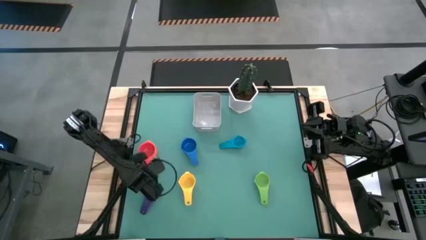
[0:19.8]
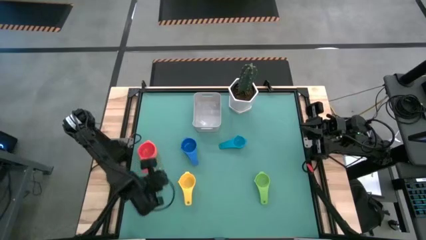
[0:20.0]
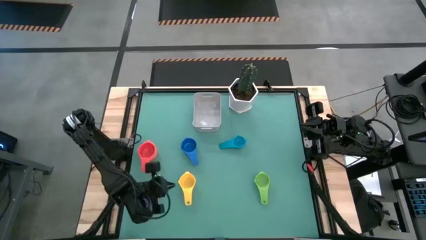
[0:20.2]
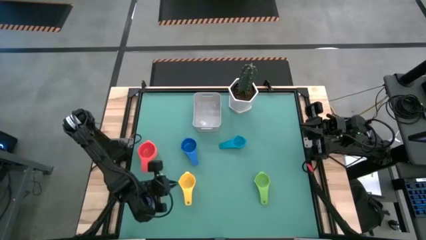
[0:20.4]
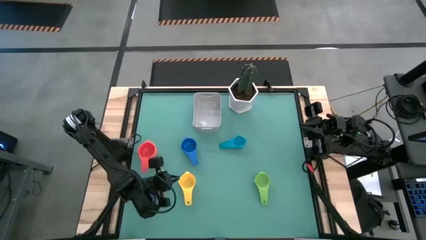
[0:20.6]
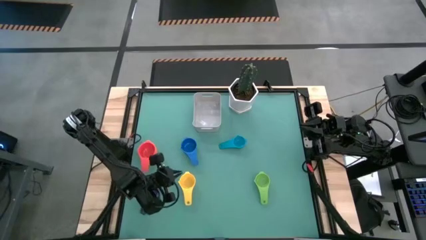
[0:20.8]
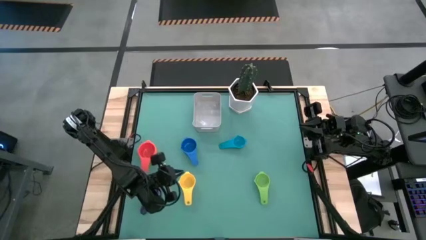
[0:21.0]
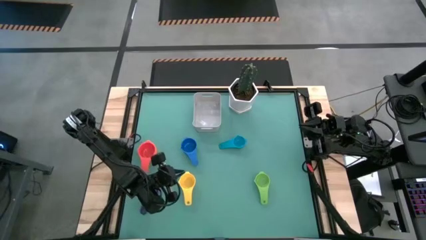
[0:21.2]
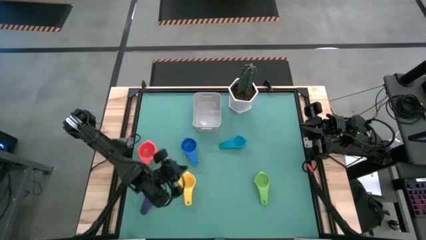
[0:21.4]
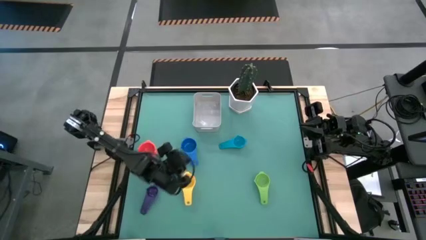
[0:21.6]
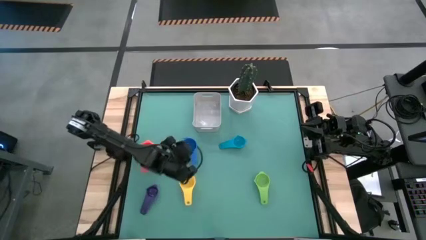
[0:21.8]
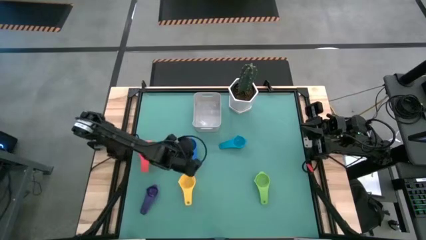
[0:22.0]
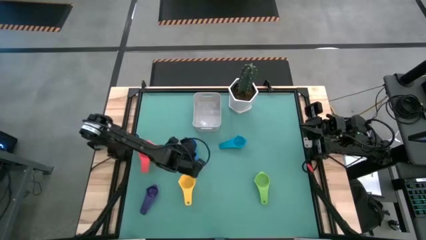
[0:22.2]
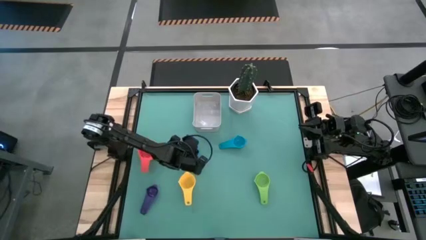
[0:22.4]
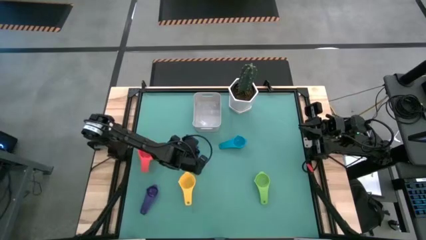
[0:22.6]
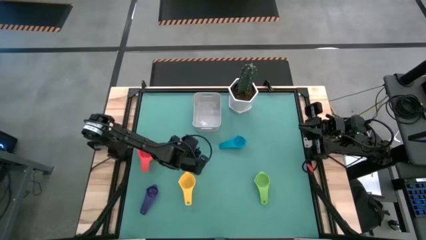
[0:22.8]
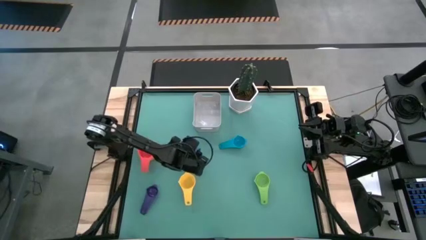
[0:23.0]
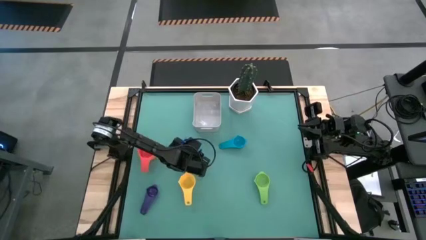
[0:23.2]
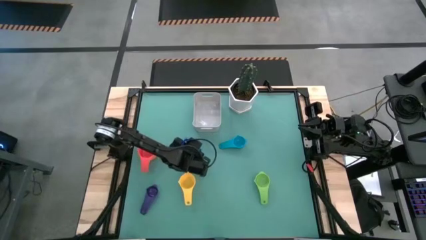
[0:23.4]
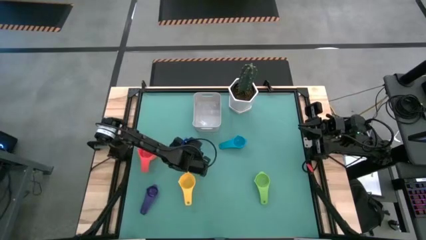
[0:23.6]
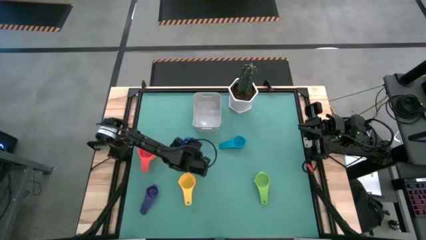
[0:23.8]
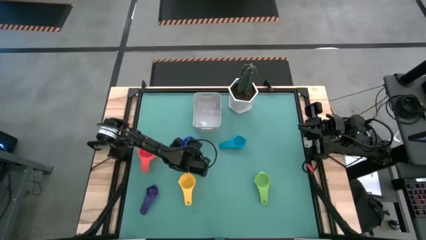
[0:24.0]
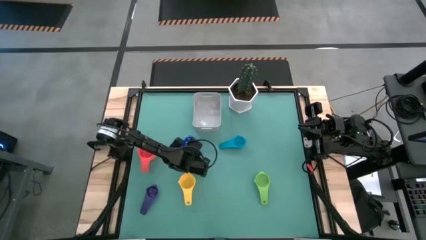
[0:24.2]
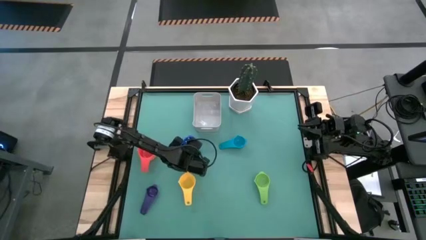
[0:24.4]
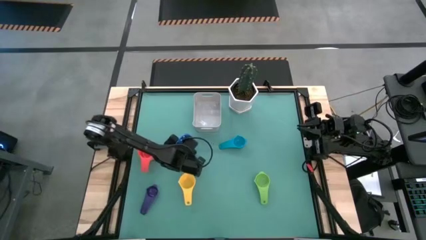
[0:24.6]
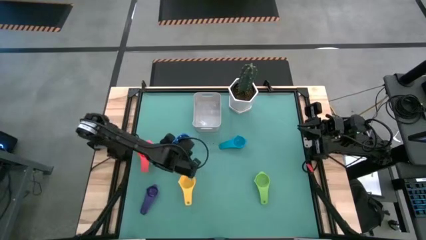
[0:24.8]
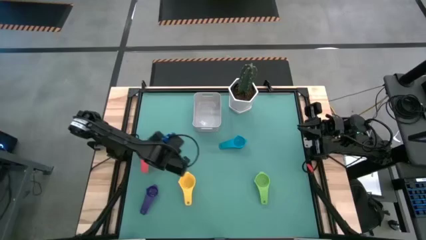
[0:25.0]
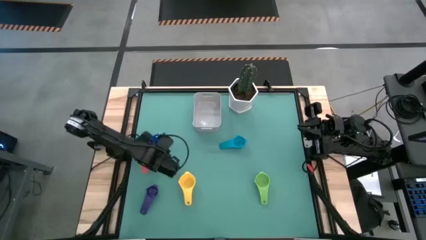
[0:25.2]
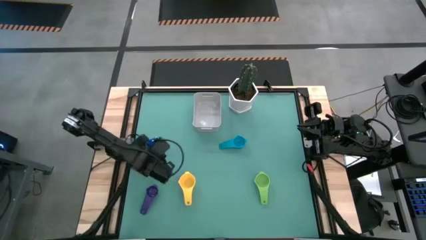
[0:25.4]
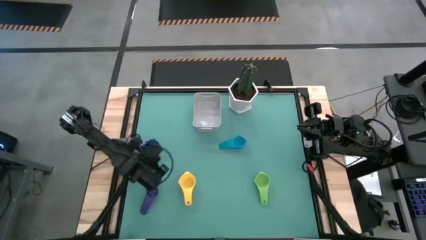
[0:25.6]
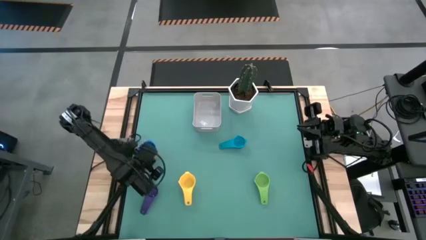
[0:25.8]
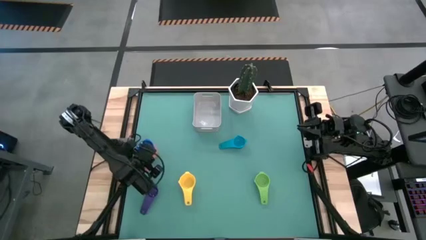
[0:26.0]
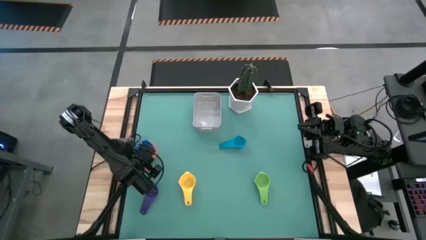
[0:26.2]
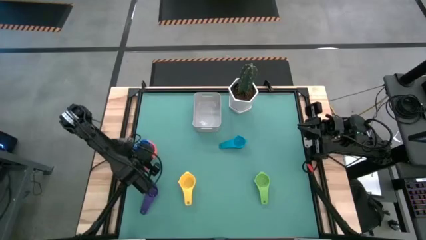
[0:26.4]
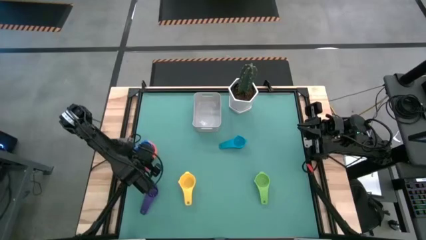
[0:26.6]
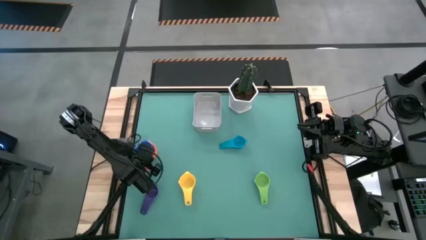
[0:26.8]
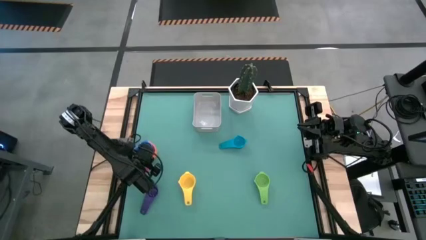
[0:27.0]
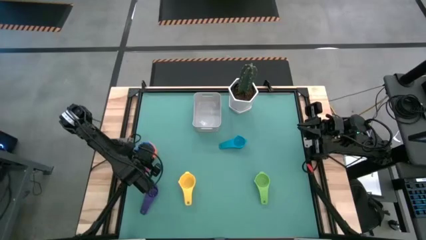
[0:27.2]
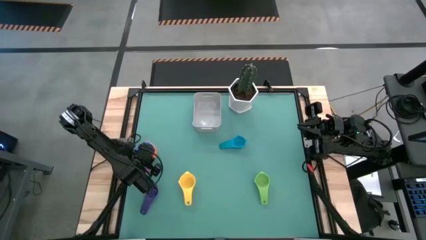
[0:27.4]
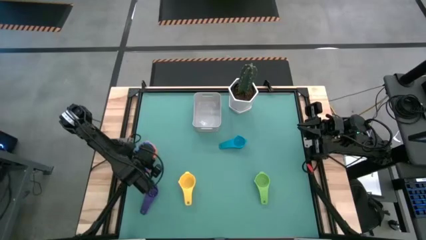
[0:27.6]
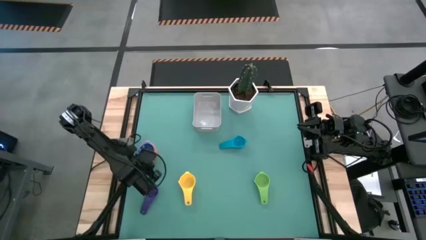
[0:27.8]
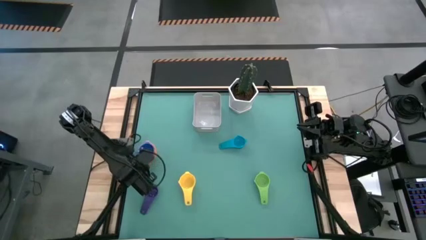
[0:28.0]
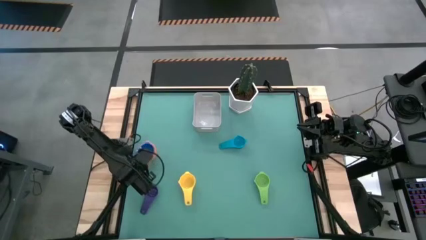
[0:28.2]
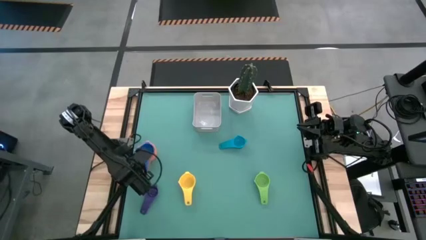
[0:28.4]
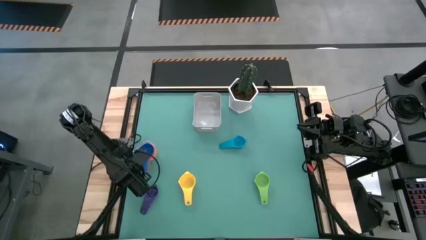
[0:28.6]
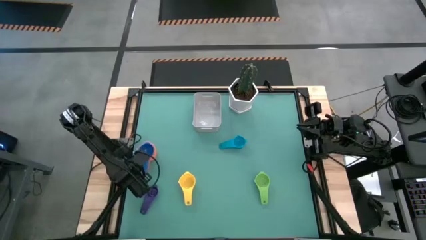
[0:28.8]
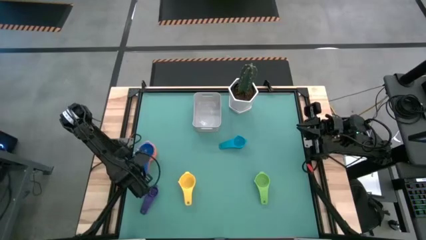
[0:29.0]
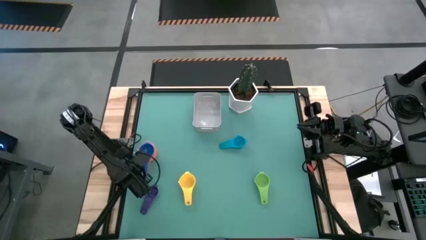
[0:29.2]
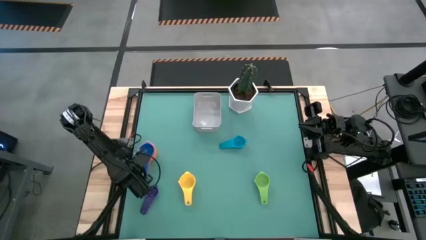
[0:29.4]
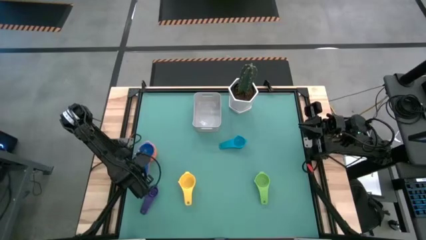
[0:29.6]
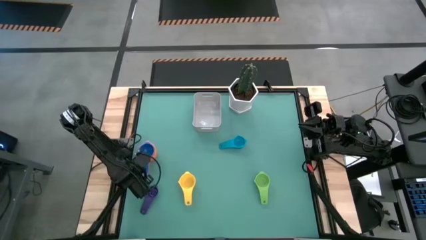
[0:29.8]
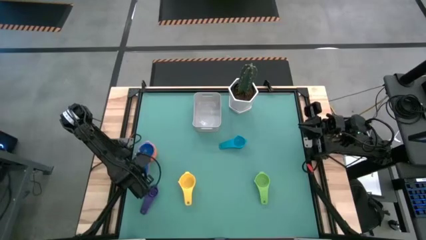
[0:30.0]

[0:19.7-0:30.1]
Task: Nest measuring cups in basket
Stack the blue measuring cup on top of the red measuring cup

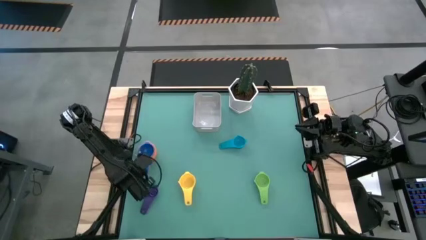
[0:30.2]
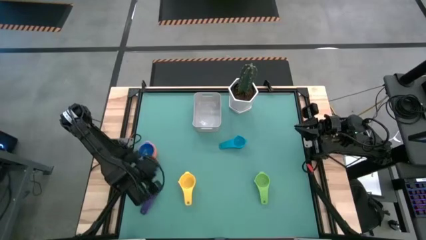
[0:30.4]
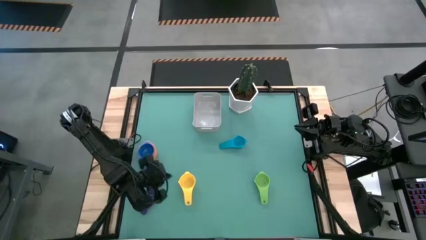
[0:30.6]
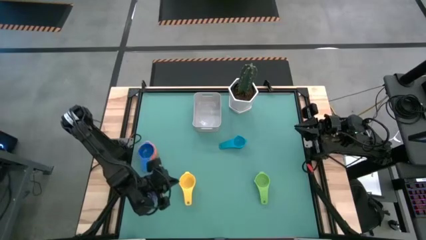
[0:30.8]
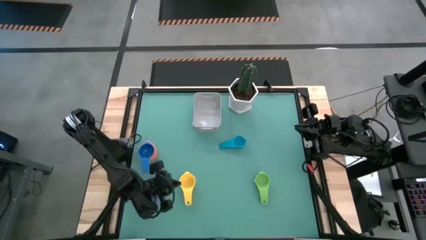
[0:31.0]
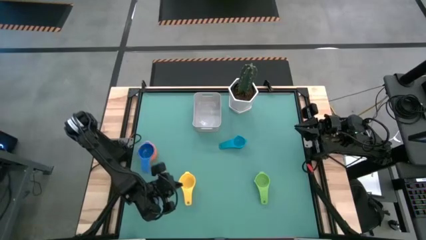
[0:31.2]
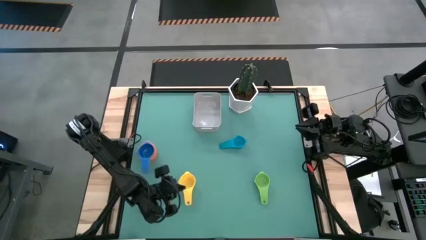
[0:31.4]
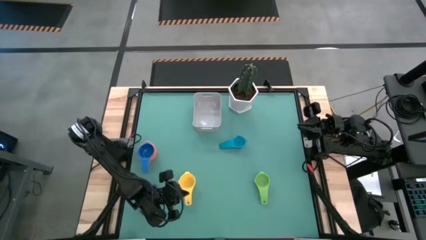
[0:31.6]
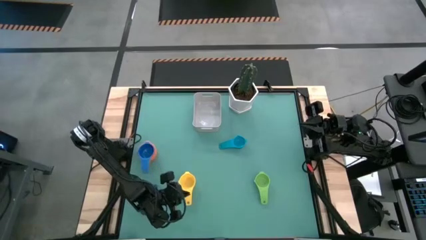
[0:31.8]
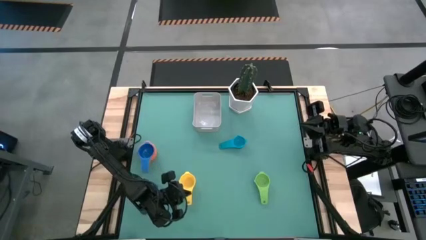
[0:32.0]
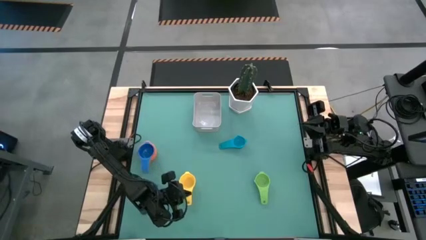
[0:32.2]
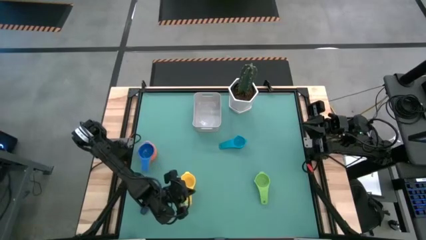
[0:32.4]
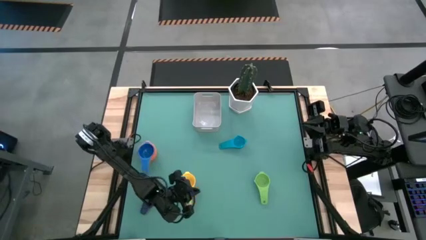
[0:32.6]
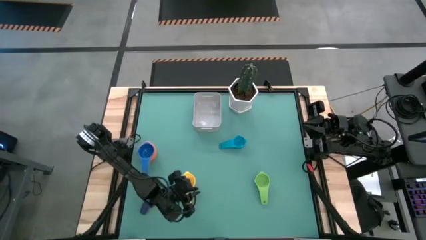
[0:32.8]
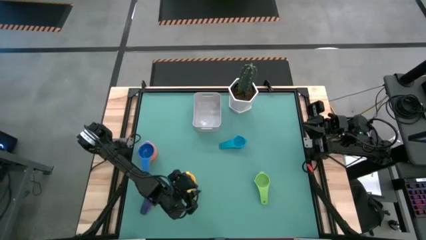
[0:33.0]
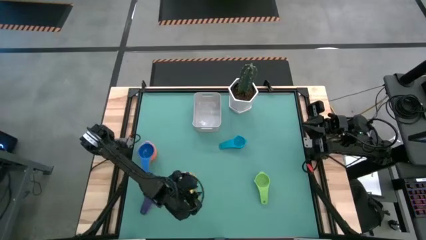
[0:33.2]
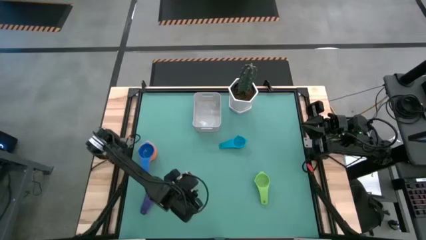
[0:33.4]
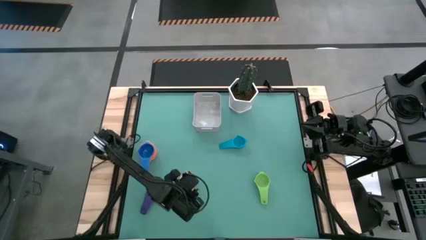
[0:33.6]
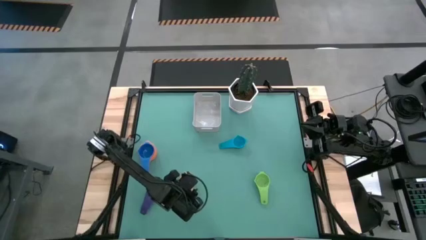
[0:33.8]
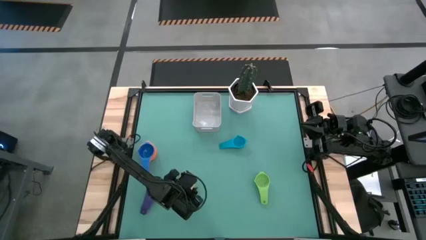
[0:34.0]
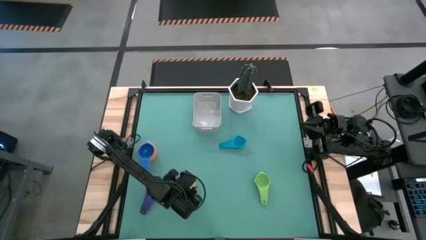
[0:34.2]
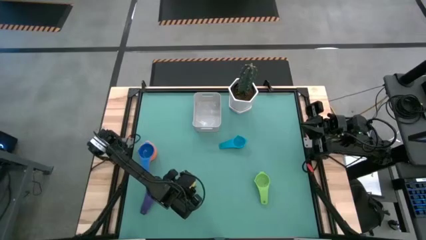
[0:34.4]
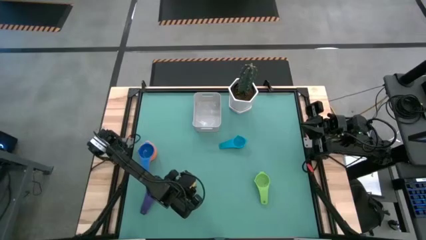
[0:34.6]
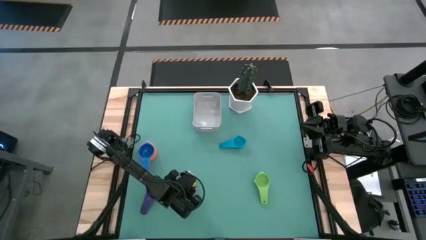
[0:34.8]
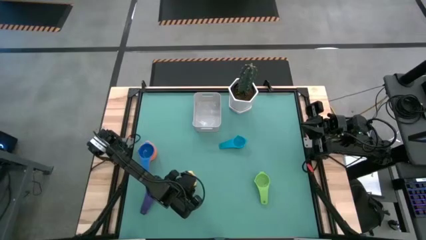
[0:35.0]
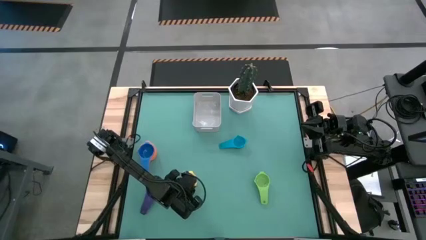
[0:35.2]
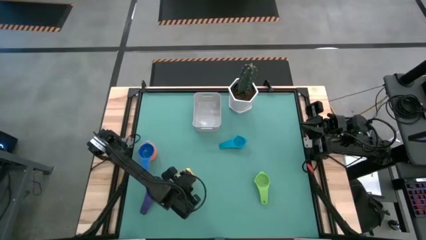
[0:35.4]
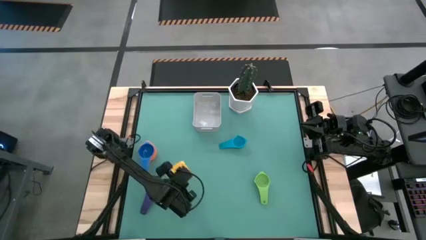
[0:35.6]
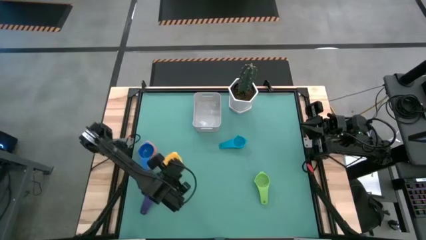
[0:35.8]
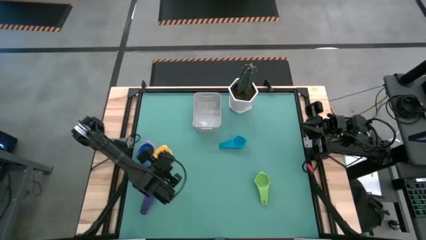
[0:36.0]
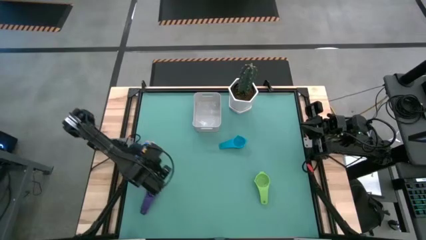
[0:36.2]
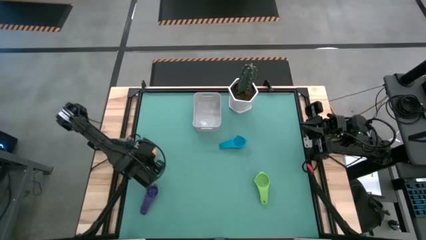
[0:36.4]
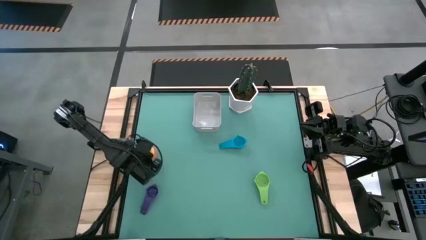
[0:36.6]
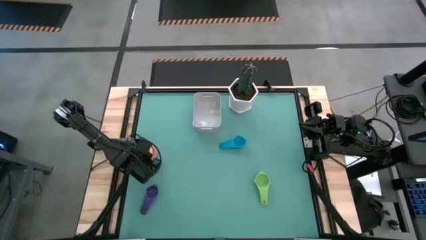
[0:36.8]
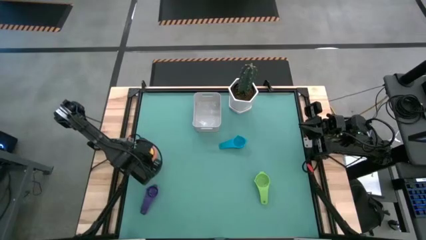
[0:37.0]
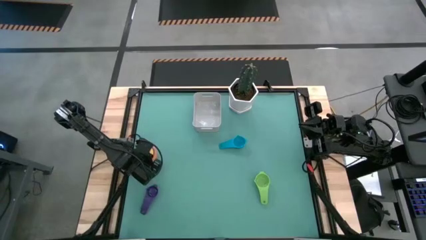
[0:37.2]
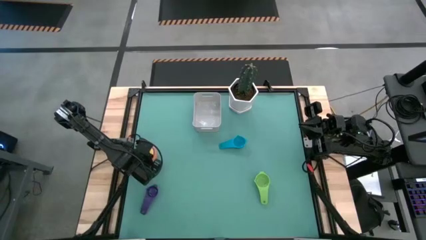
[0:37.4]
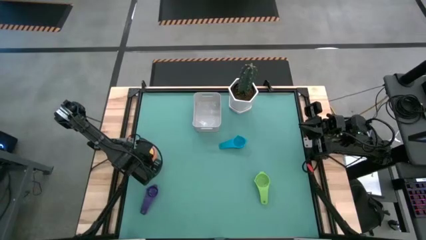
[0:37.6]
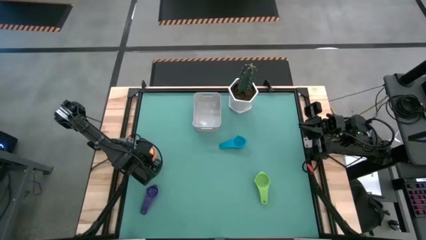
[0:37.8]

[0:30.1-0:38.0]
Stack the yellow measuring cup on top of the blue measuring cup
